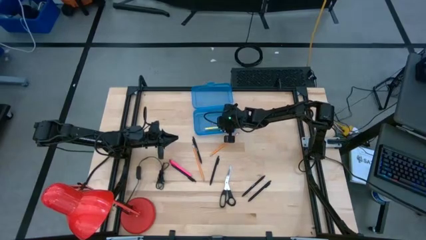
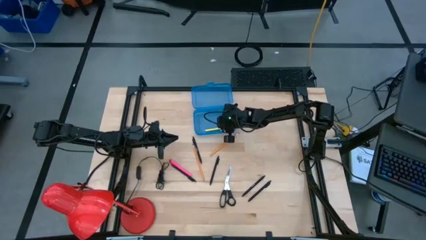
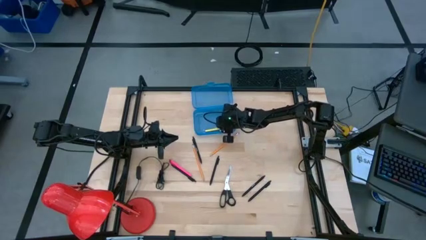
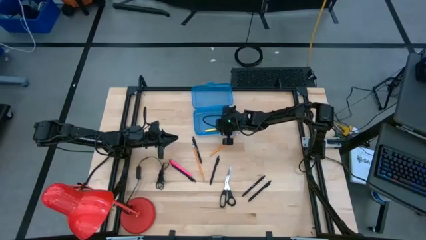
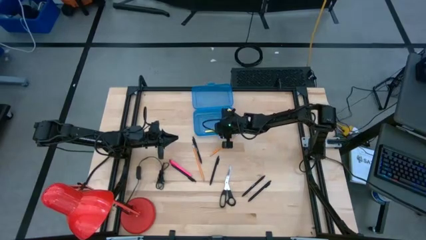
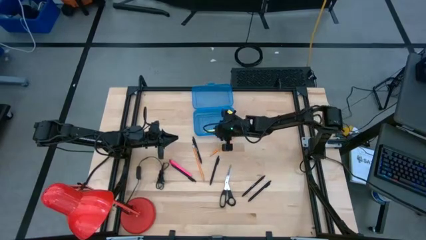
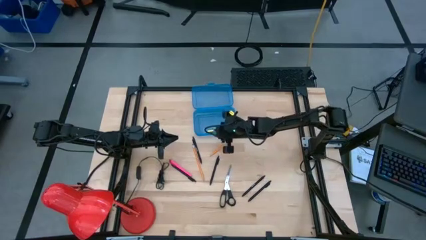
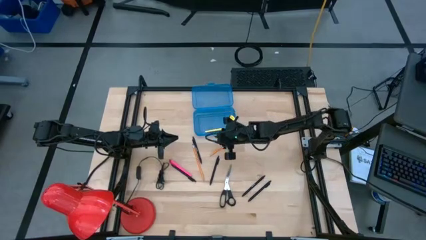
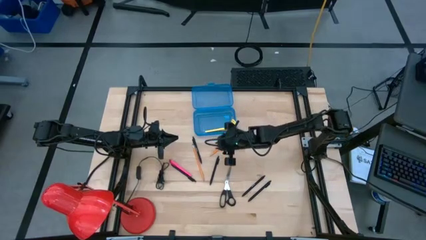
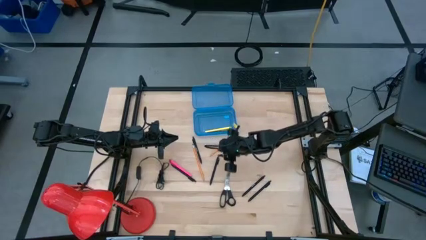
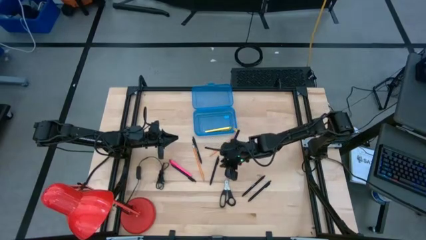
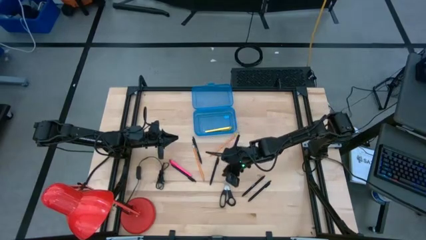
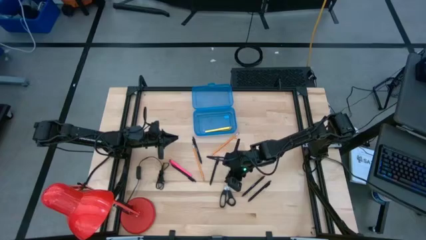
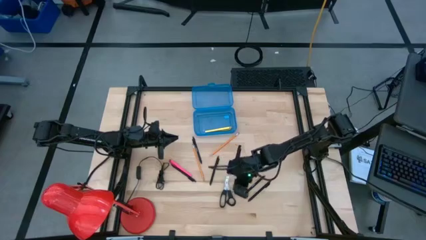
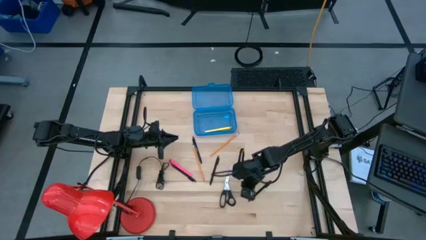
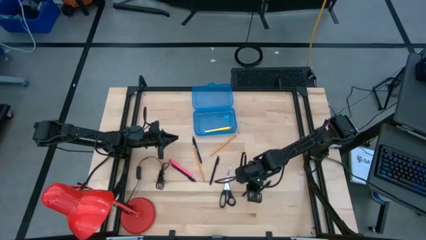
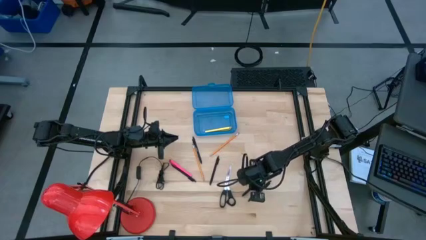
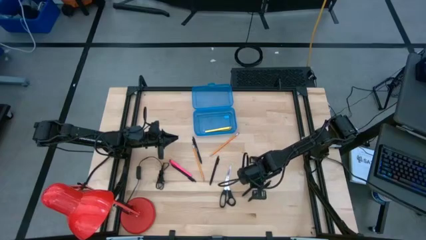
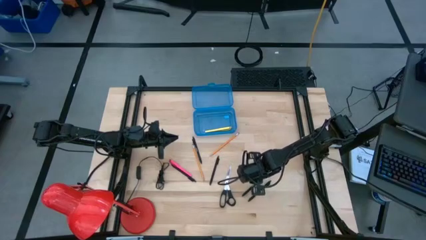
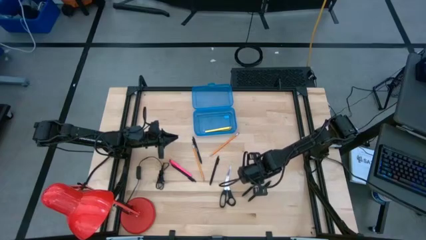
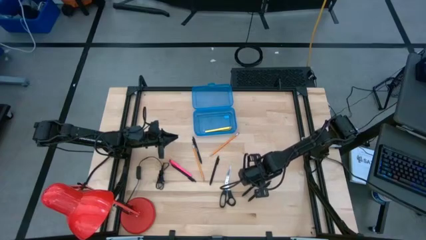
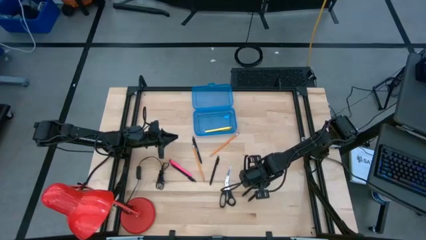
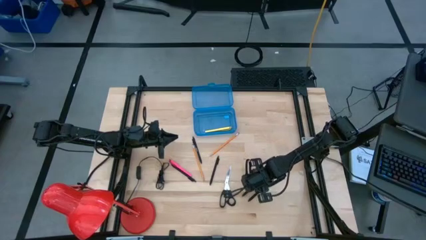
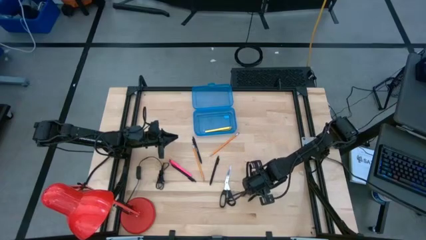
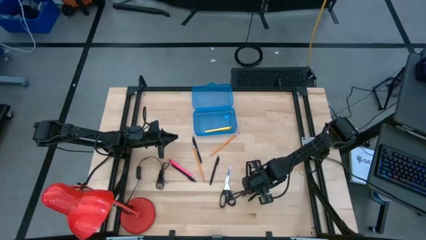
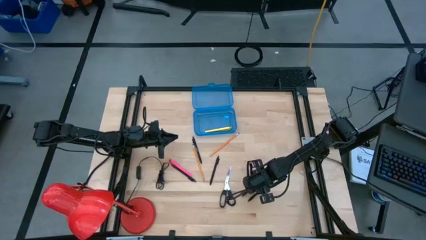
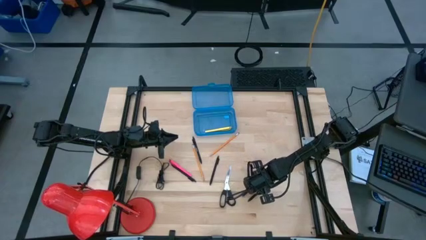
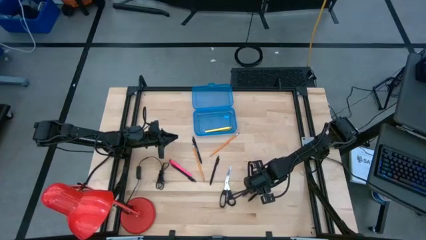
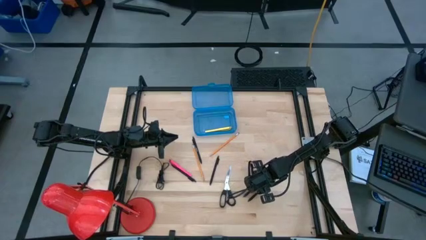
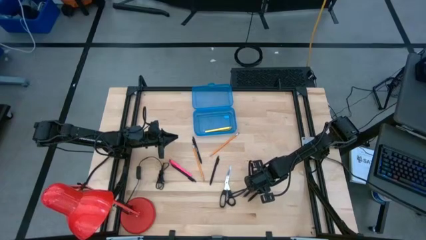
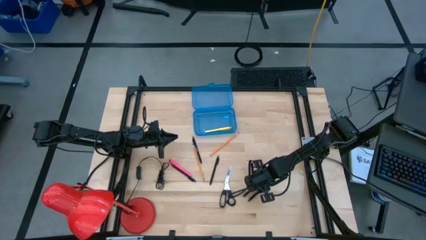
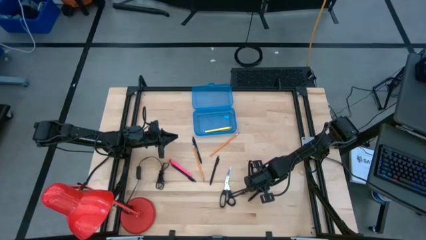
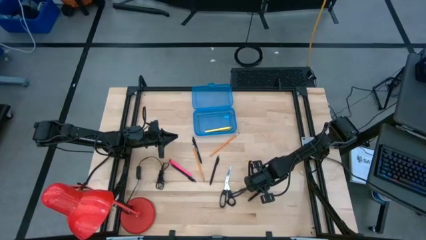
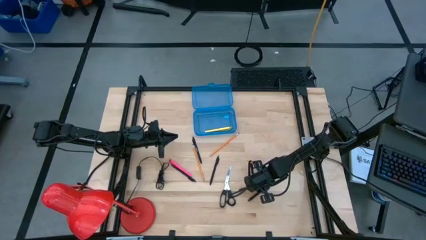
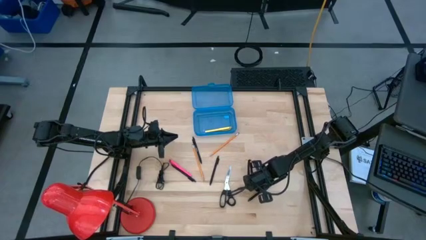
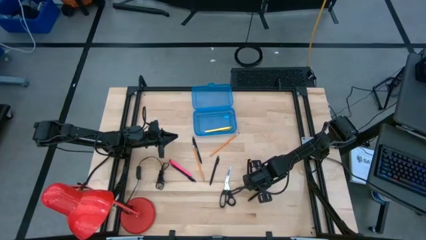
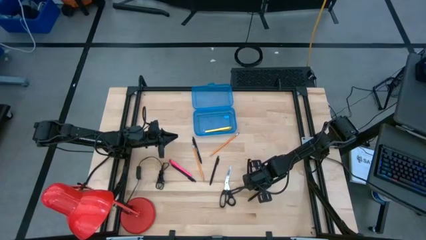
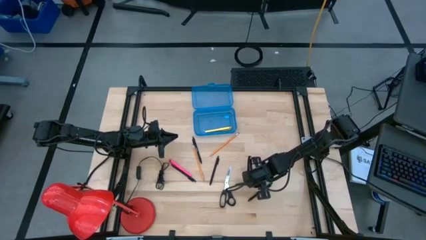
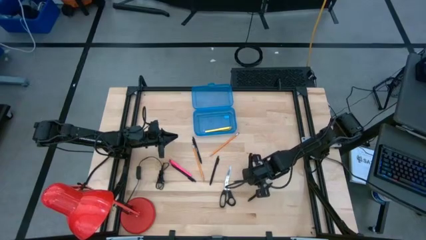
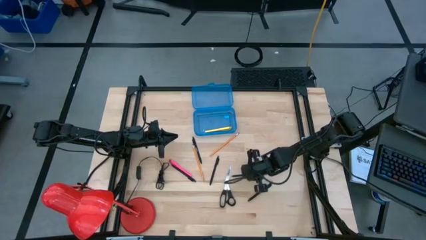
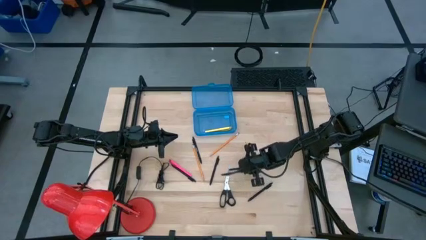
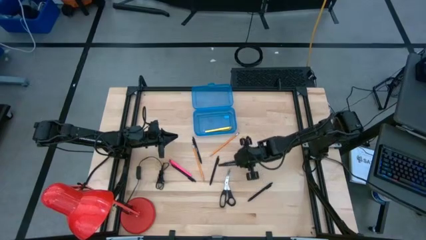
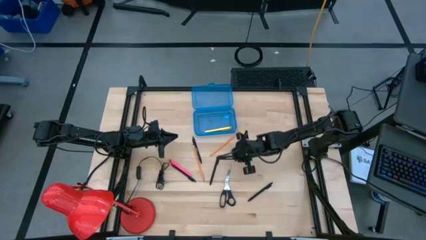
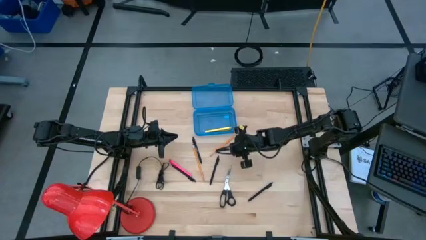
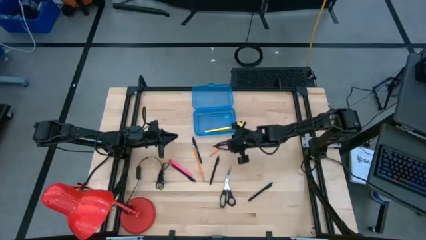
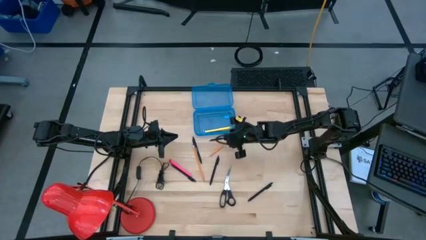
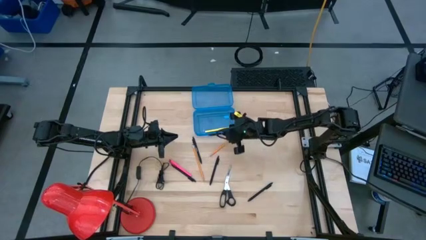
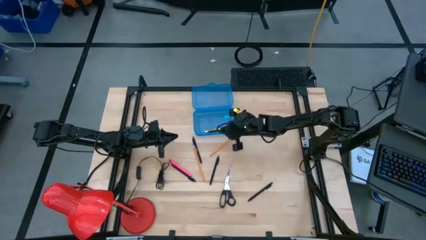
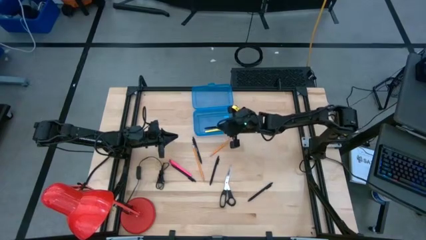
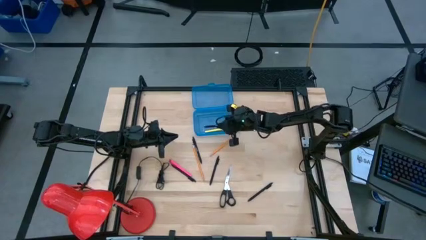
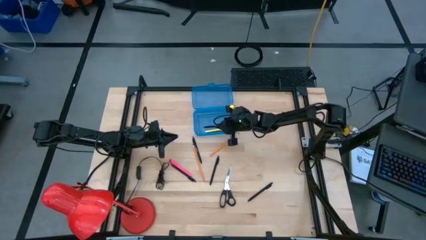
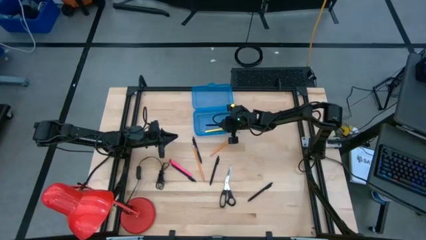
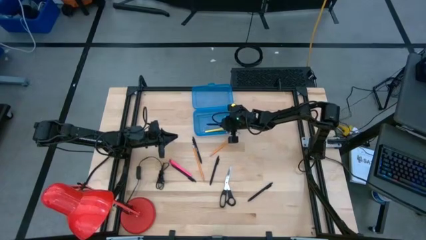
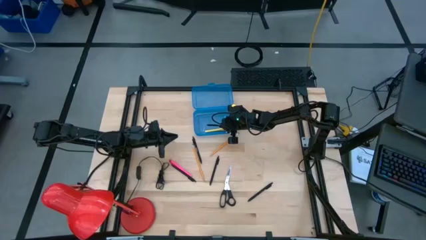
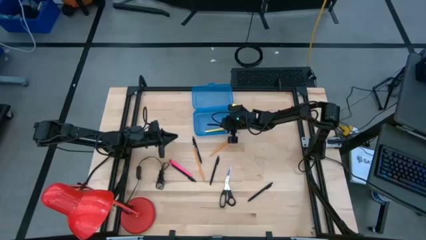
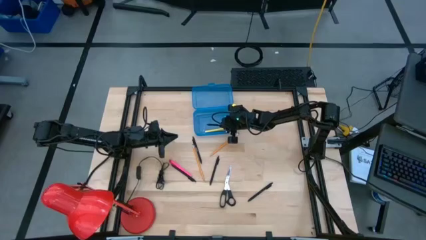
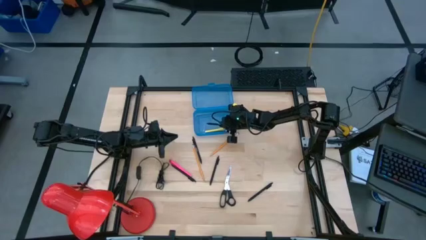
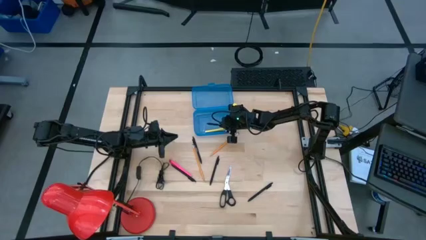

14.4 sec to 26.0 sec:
Task: Pick & place school supplies into a supply box
Put the black pen into the blue supply box

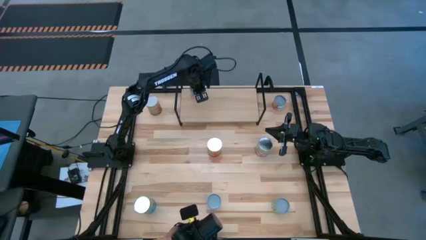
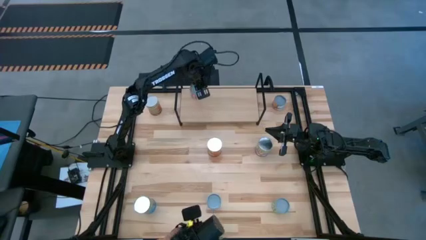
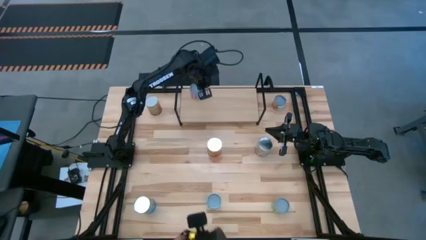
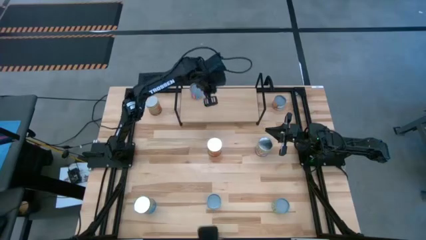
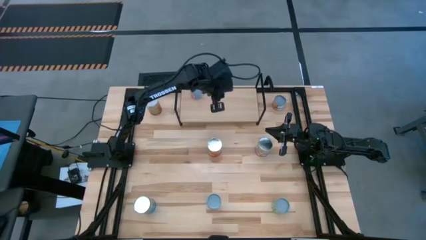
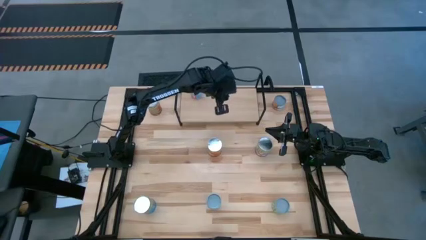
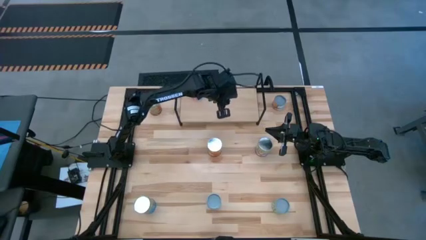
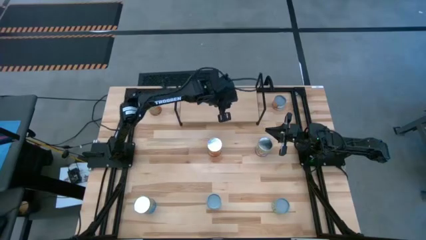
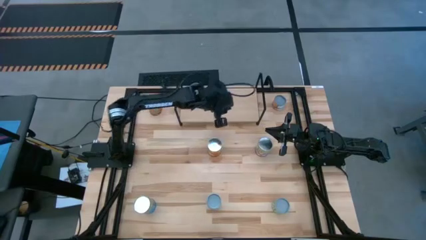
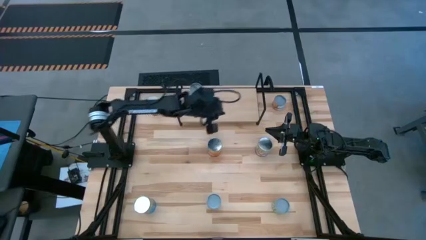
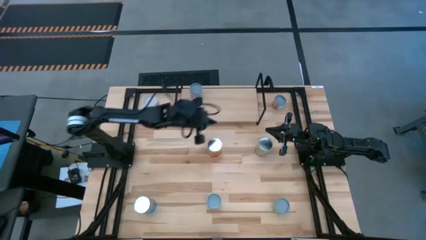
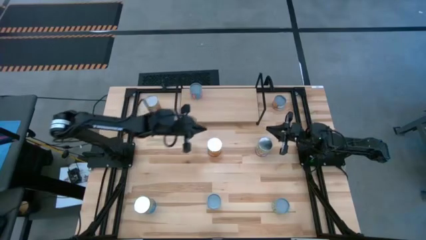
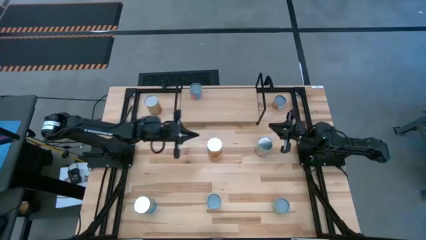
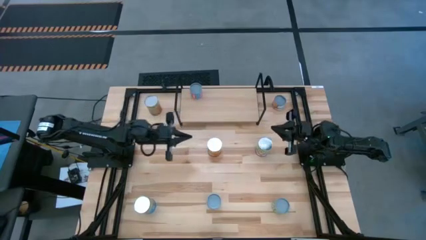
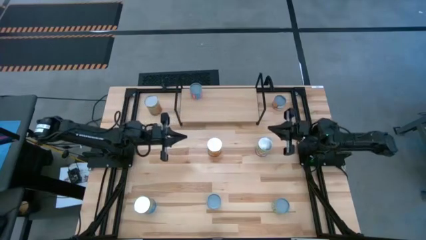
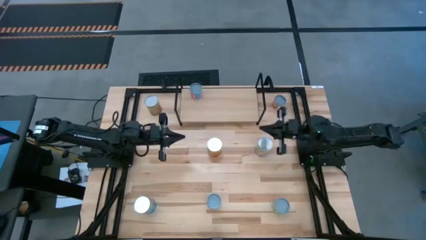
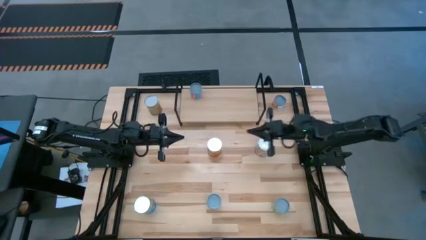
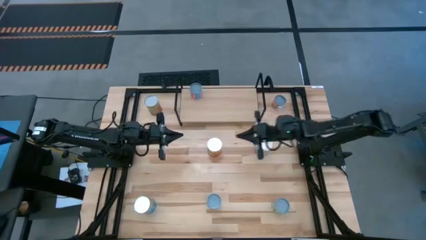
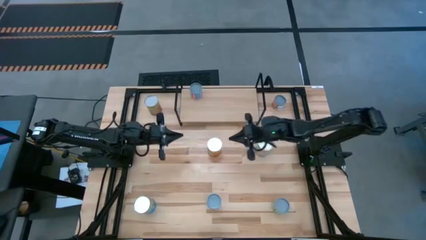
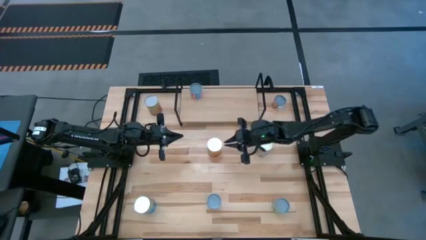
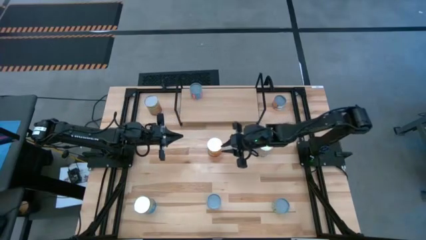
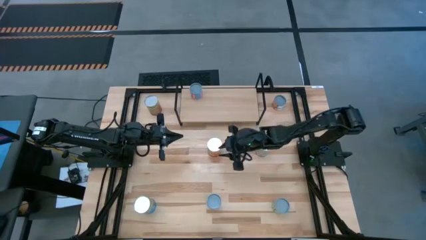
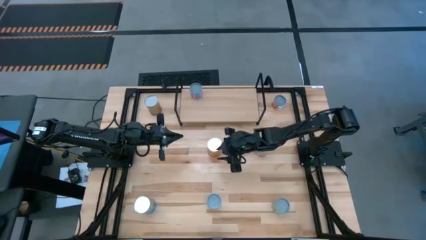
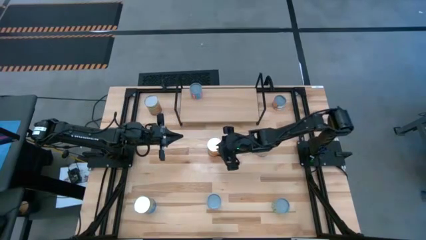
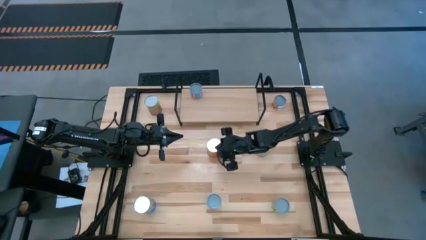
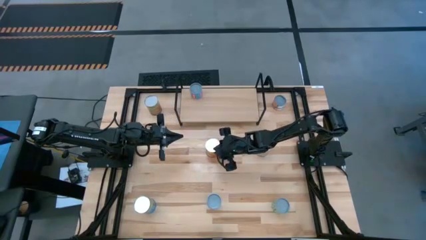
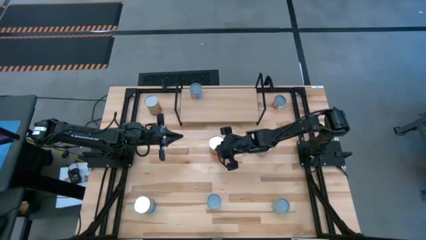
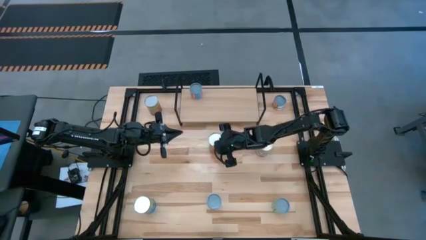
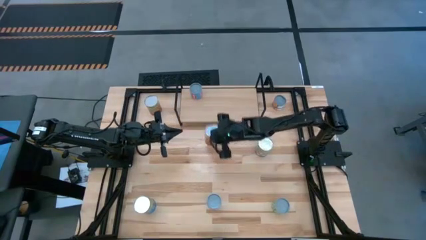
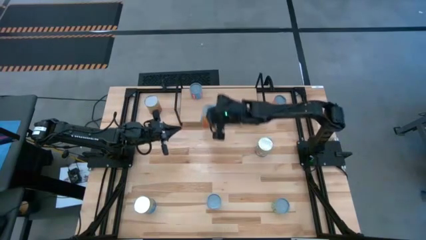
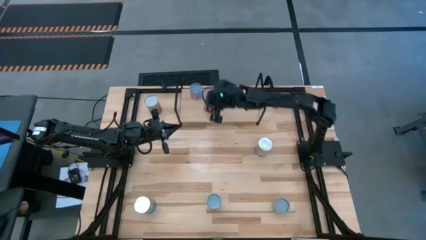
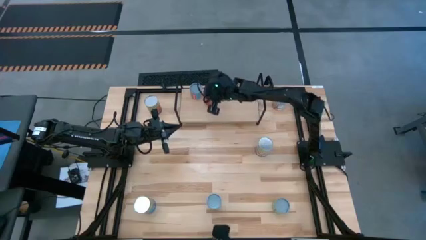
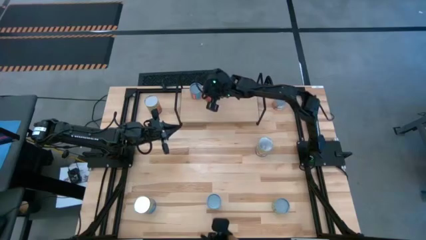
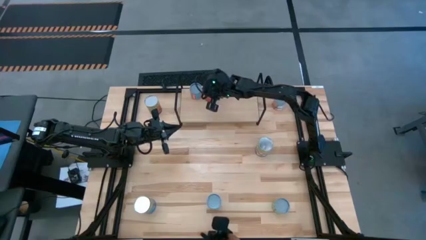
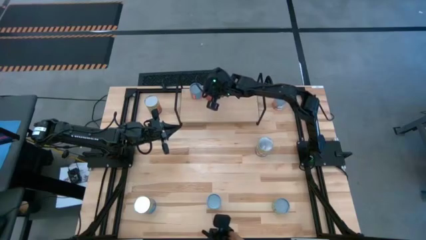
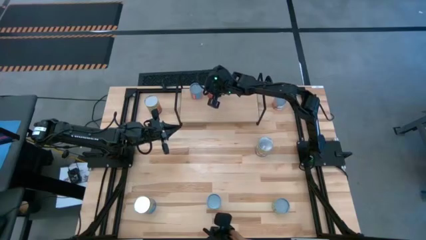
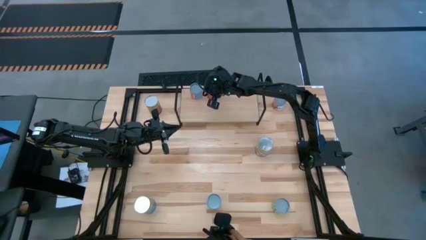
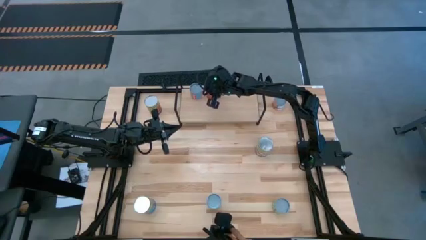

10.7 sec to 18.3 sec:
Task: Pick and place cans onto a shelf
Put the right orange can on the shelf
